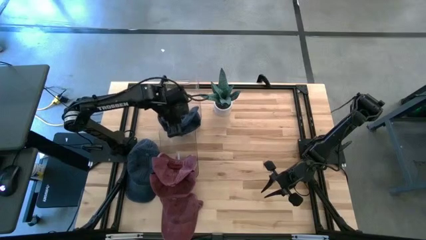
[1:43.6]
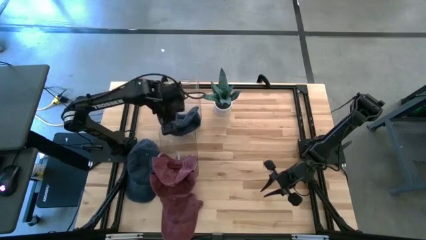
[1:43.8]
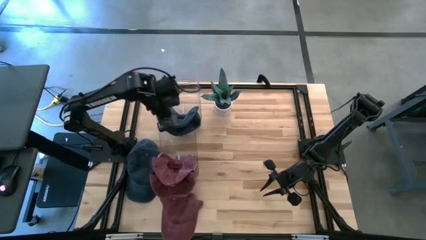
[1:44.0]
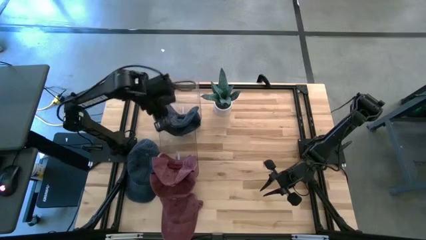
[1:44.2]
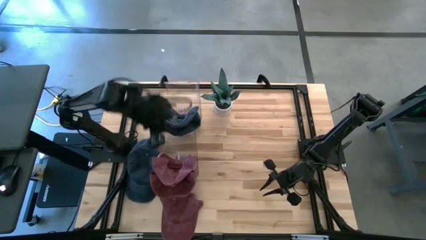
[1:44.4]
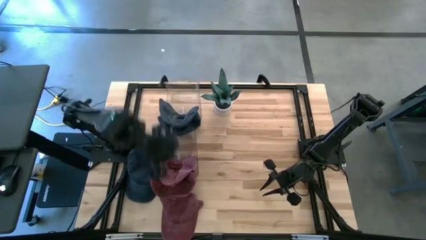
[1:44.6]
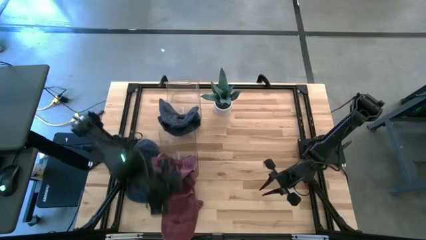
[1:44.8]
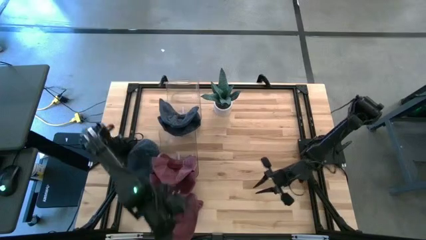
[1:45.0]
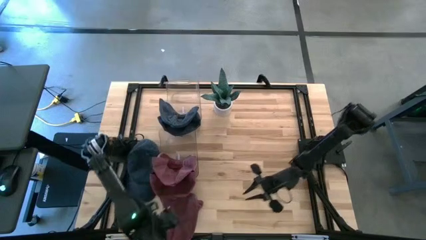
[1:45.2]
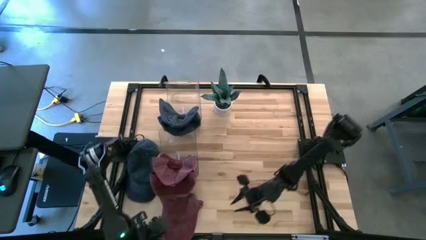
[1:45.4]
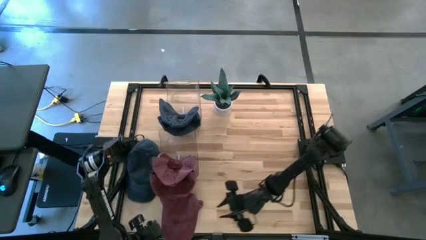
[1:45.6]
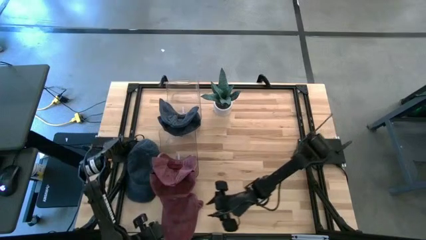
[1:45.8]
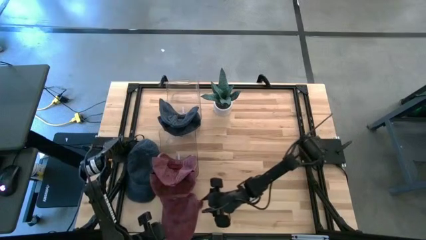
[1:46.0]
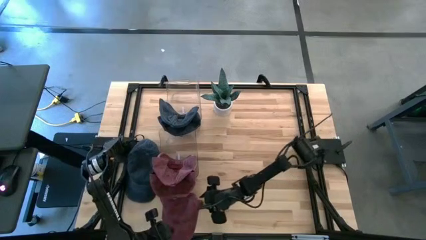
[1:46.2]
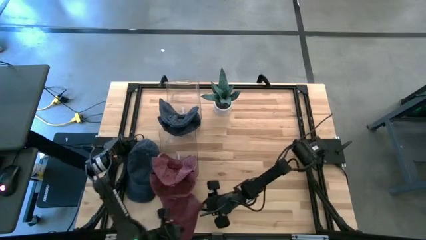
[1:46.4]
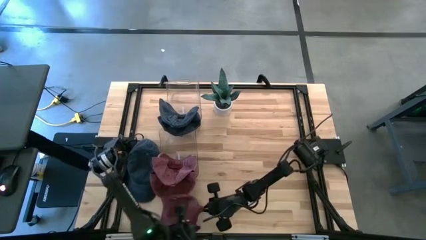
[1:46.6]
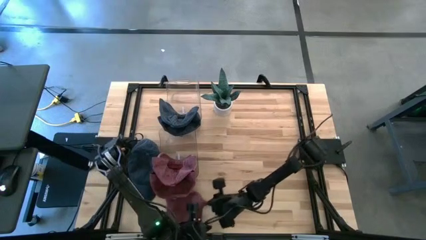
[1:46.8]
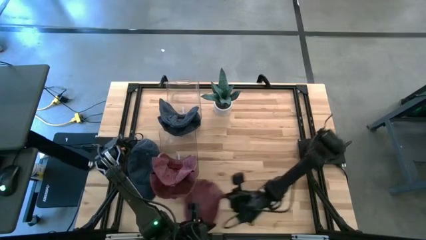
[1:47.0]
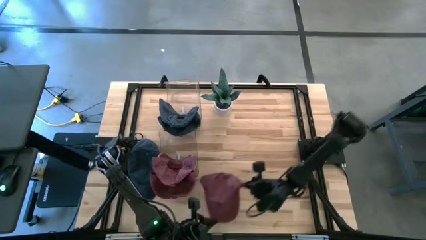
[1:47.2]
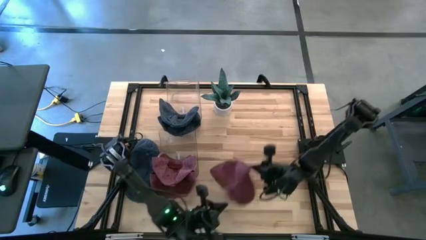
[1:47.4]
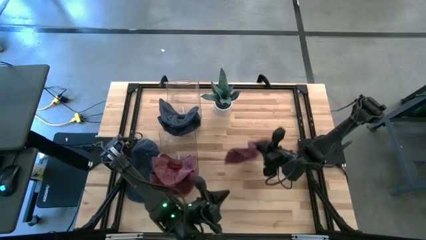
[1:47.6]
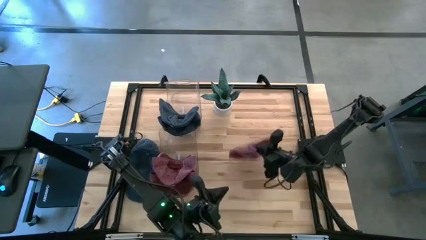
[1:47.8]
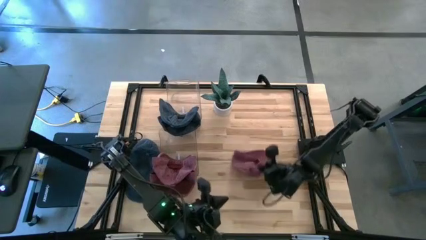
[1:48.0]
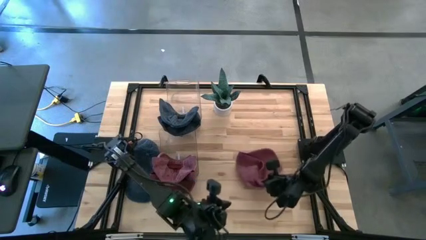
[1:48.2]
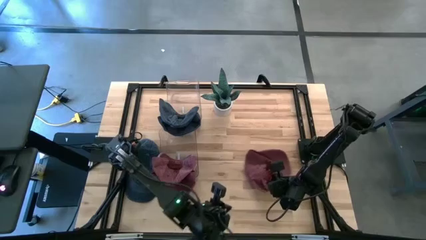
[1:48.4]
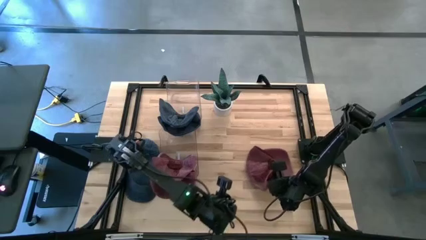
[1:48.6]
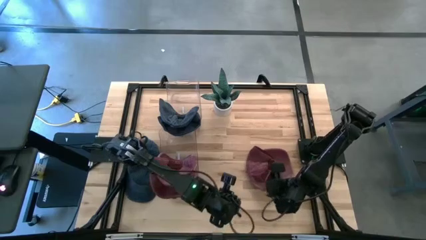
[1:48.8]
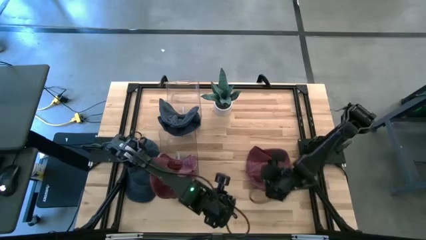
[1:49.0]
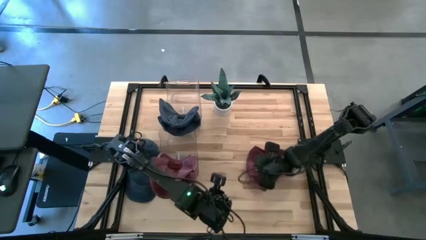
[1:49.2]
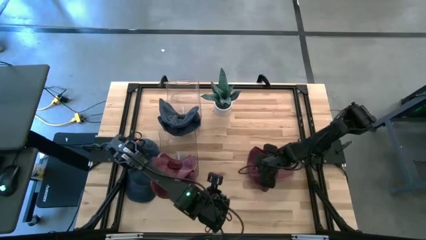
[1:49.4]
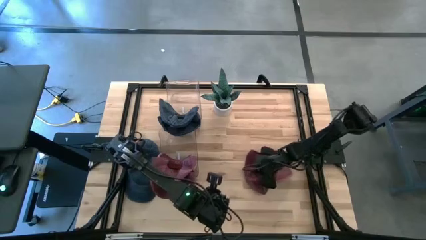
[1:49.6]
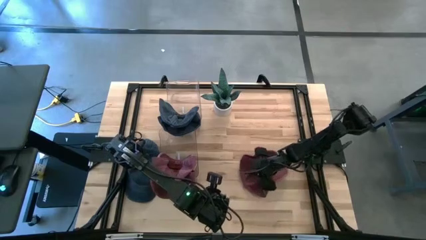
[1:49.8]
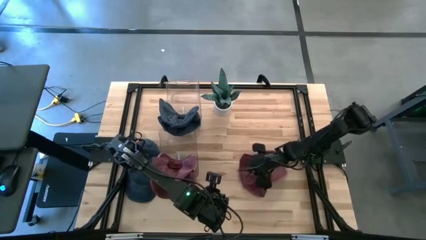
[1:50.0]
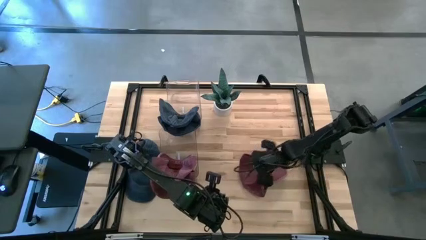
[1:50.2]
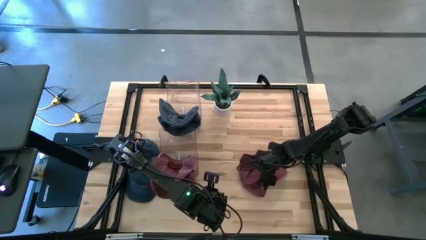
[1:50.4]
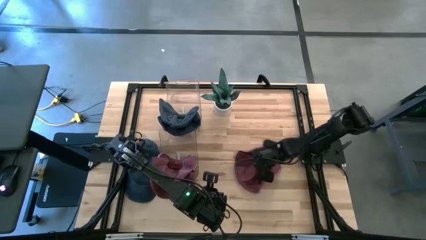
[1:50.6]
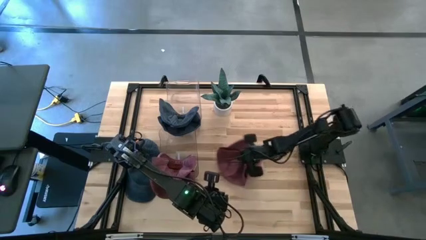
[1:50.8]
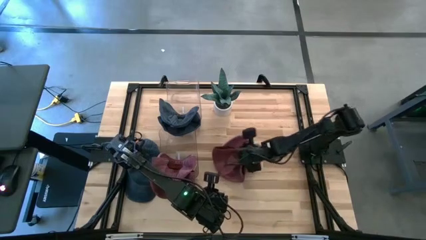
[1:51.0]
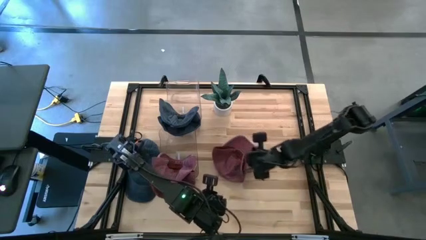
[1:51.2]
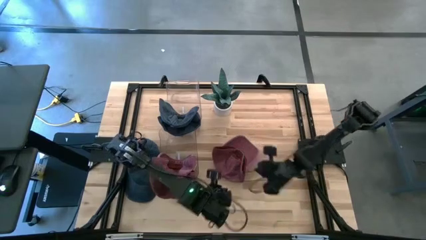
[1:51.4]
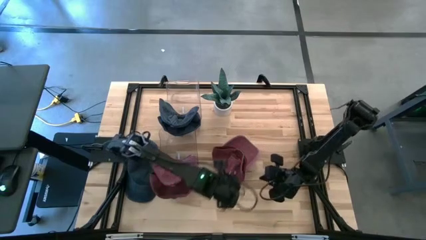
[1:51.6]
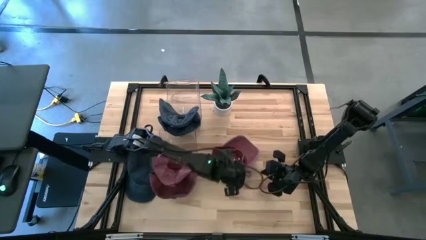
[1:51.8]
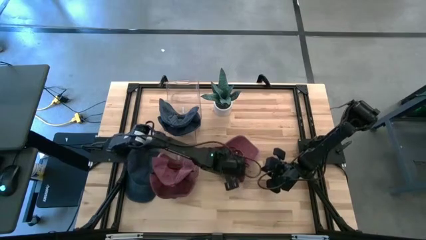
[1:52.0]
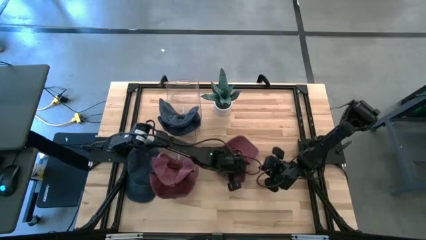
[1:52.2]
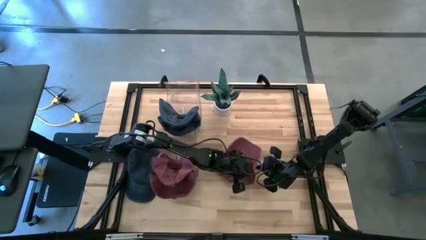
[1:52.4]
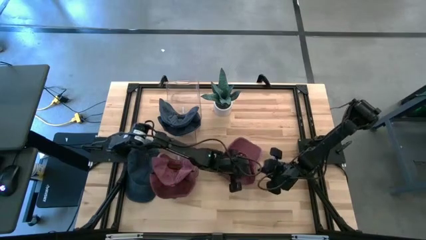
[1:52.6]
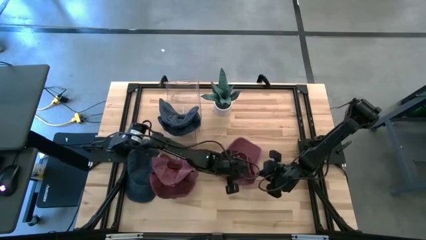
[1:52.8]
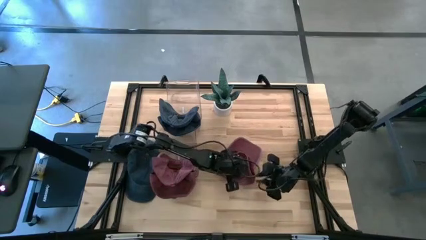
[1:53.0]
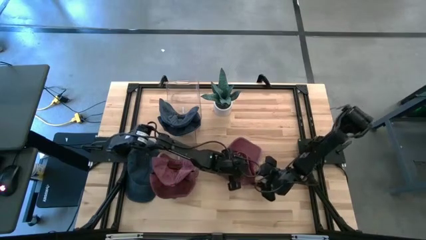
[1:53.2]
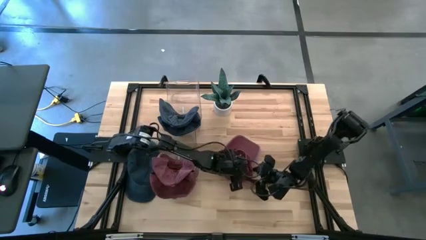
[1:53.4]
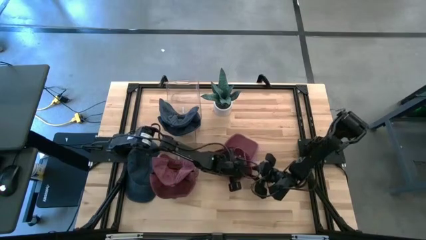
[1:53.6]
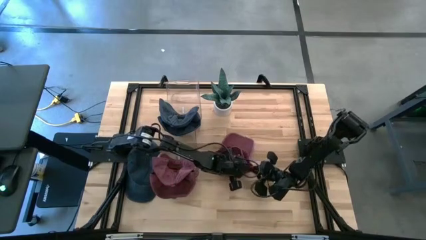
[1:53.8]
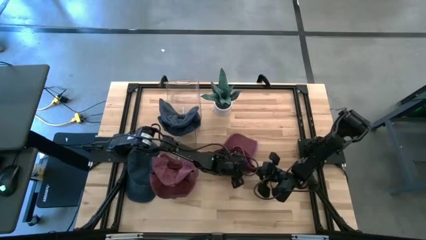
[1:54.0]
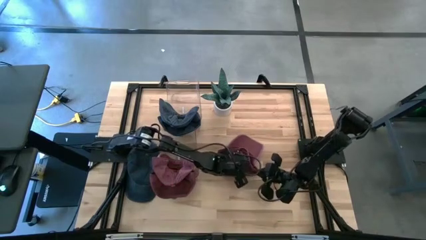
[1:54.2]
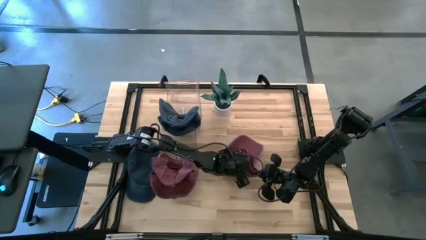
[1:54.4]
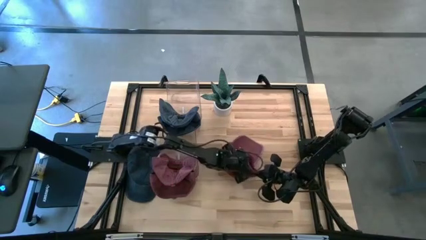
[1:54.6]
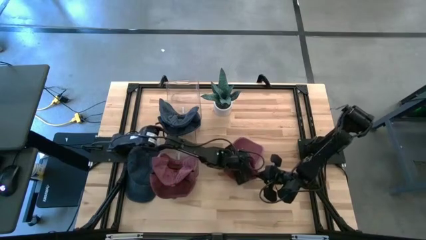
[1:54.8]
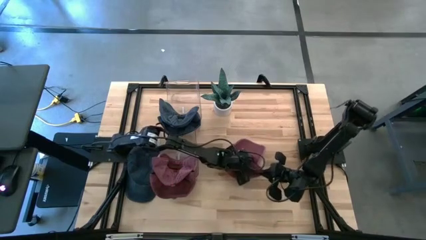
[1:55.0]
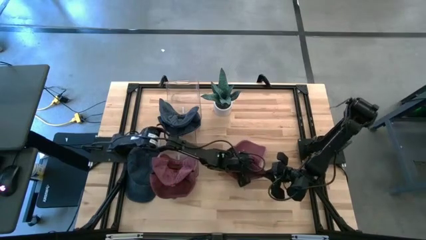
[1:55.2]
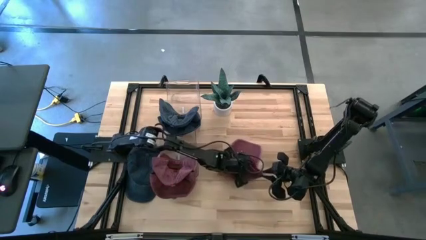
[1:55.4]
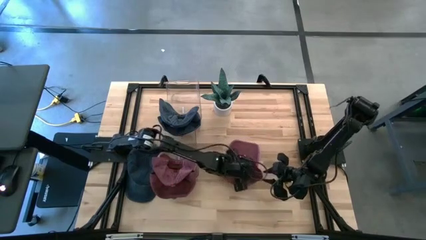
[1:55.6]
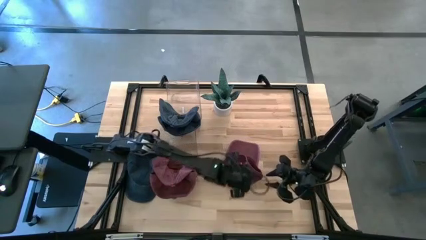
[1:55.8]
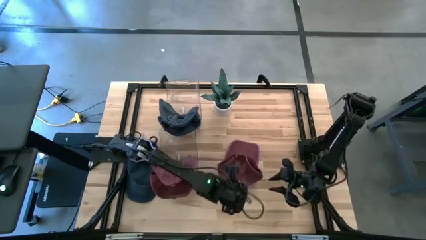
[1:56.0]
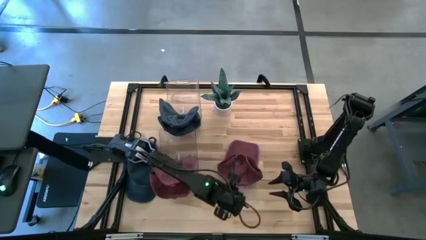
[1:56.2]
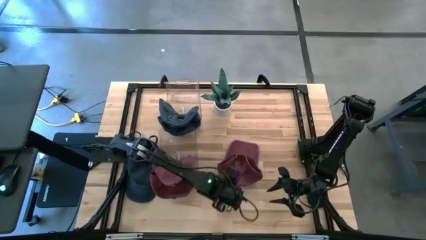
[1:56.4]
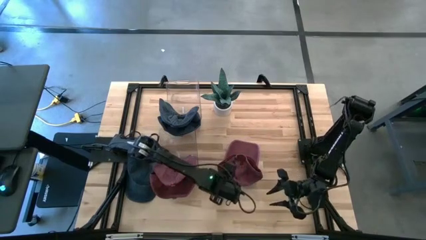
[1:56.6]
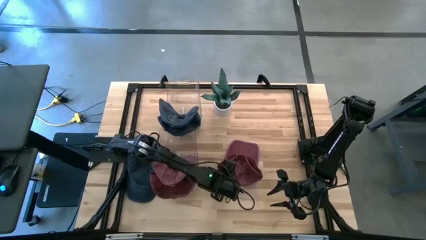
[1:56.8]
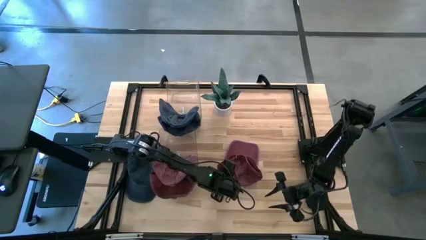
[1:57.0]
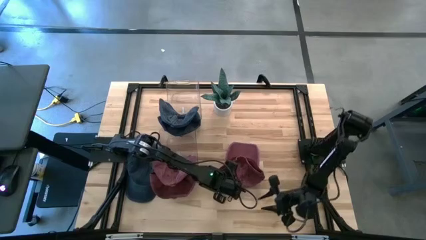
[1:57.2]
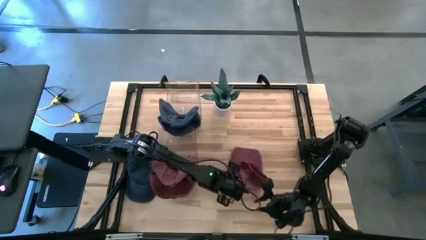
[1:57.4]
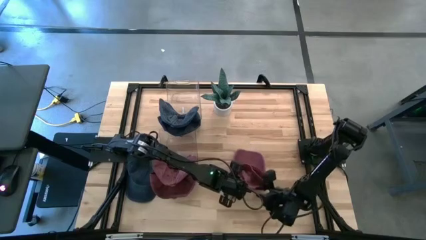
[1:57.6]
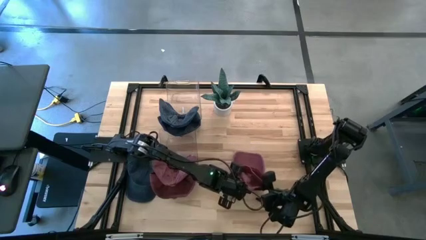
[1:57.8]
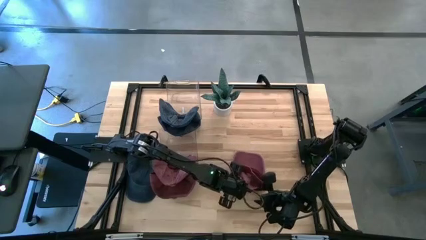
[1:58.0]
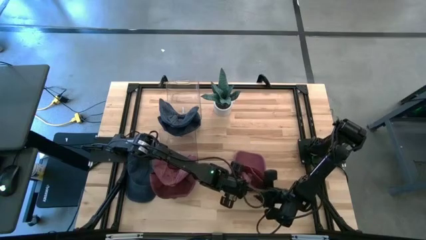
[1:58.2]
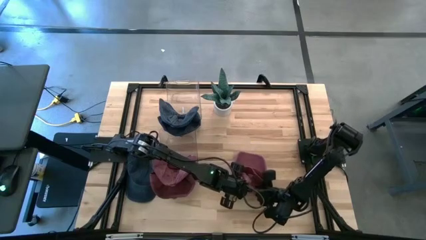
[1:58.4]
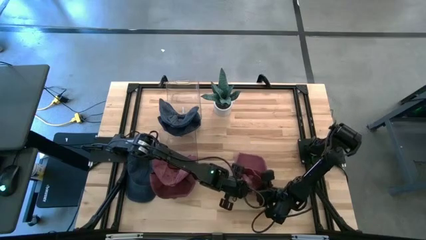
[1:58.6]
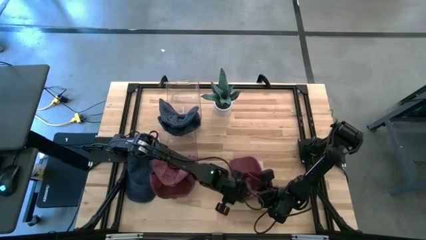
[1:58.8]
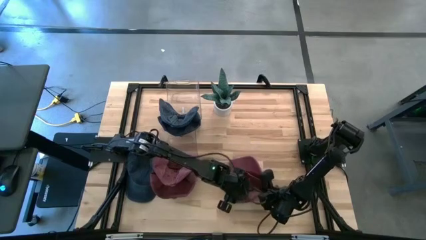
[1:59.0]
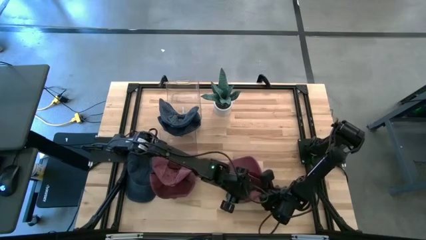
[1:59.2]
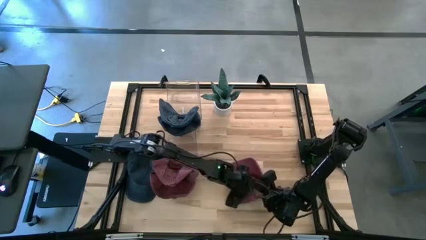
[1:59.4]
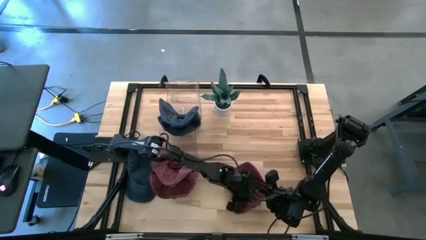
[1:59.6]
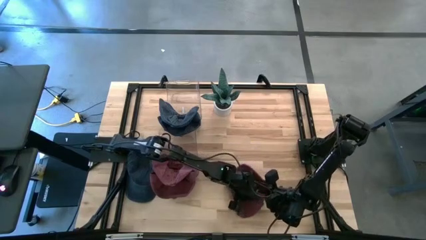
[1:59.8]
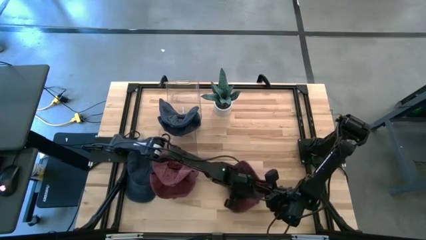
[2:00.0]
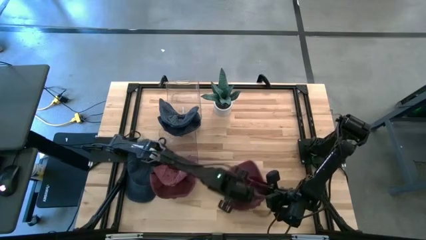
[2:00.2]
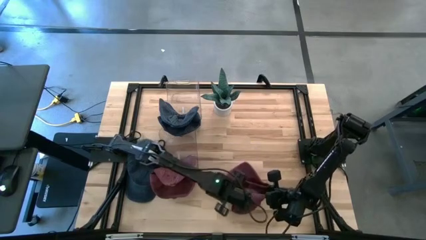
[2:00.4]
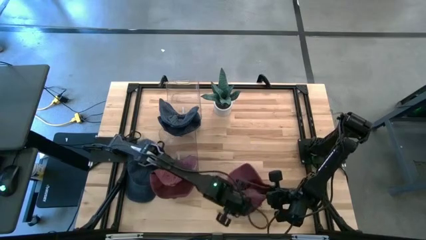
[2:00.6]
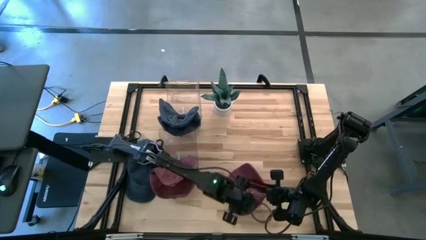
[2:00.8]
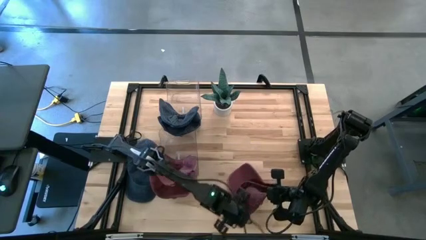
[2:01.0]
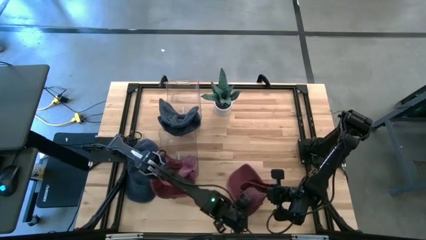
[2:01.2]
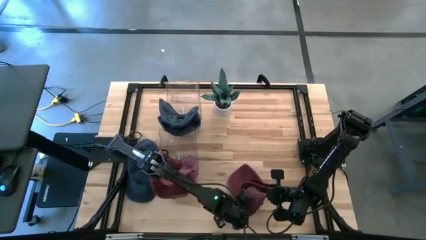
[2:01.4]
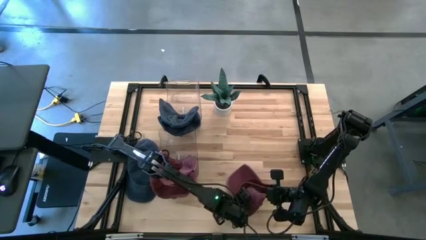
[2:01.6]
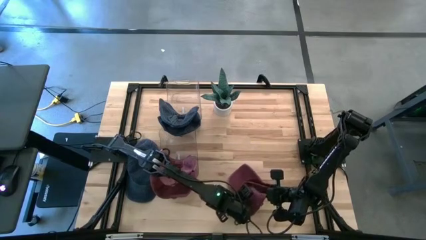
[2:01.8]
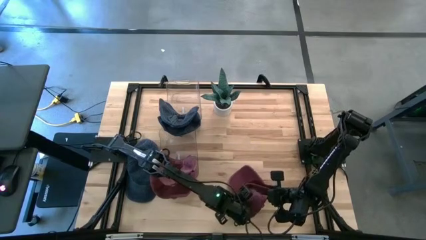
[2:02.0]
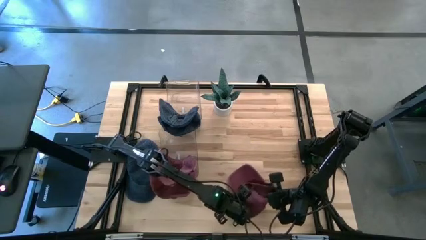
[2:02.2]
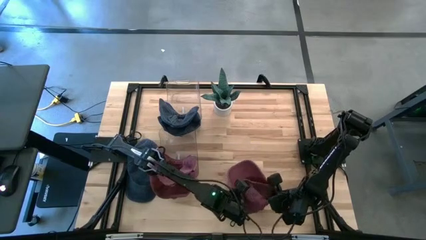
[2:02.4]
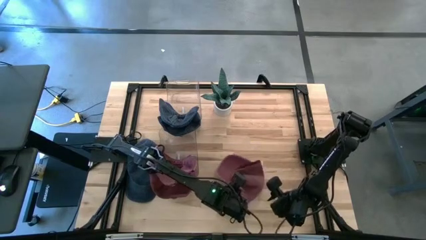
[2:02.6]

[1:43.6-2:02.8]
Task: Pick & Place hat
Put the red cap into the bottom transparent bin
